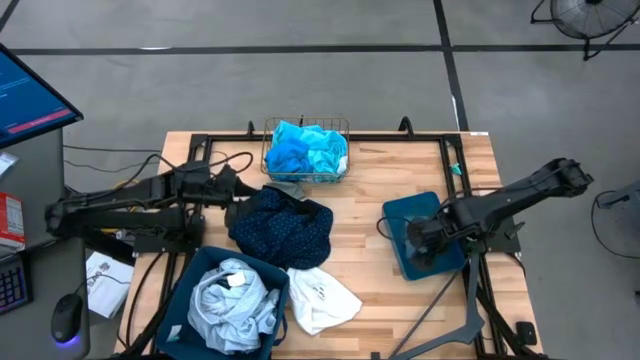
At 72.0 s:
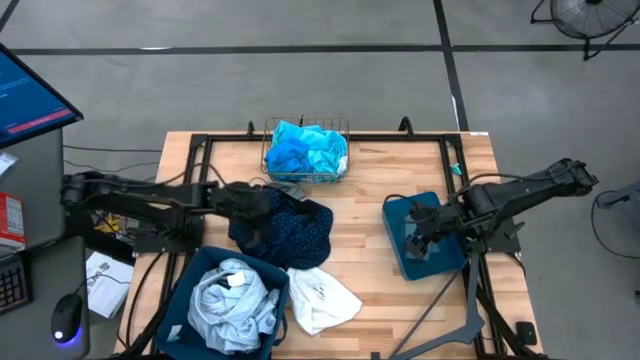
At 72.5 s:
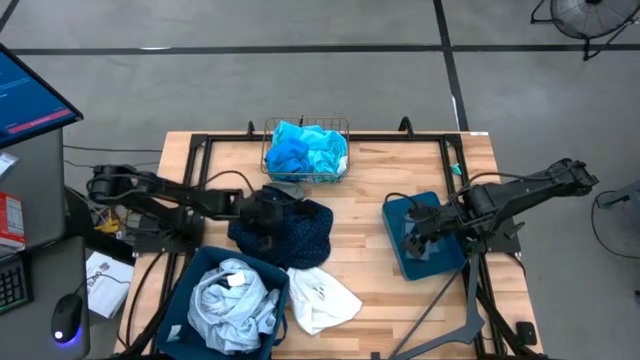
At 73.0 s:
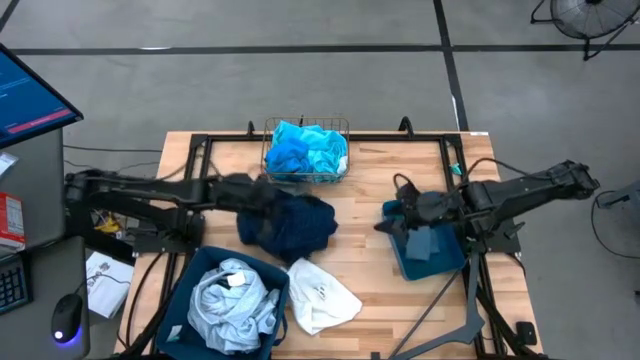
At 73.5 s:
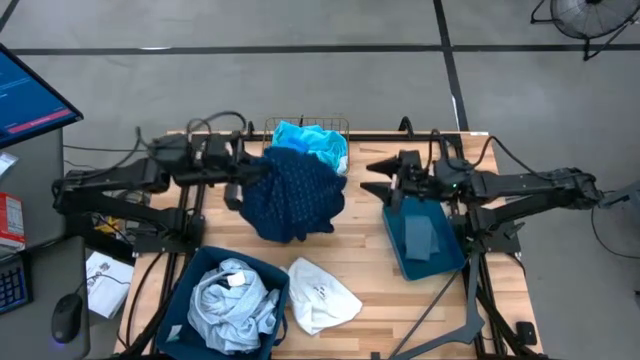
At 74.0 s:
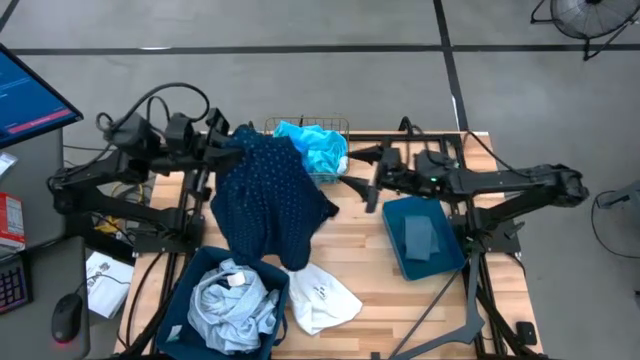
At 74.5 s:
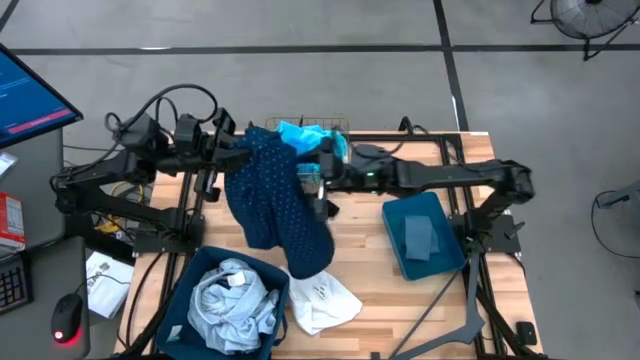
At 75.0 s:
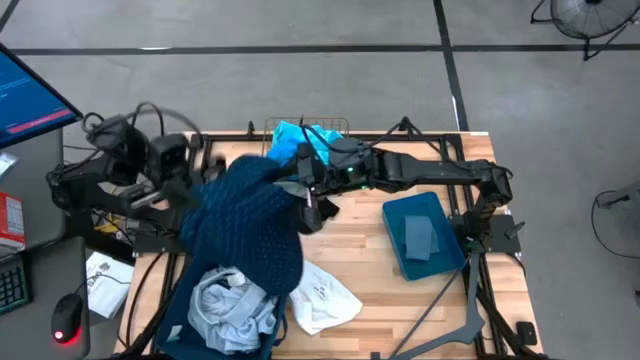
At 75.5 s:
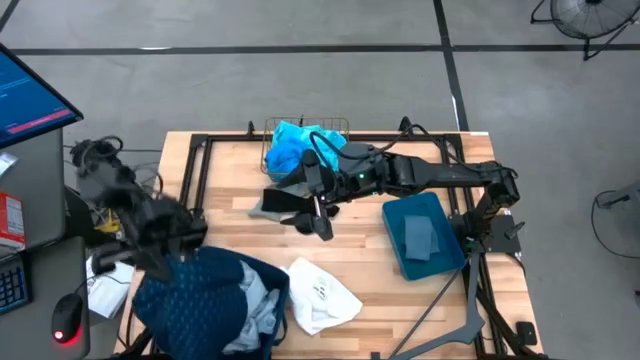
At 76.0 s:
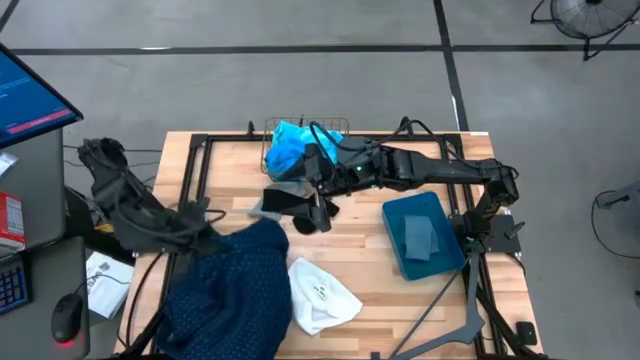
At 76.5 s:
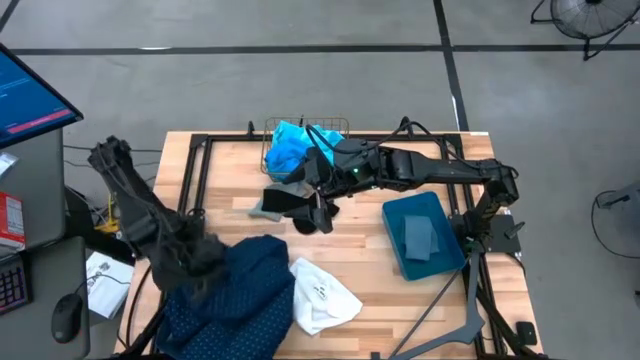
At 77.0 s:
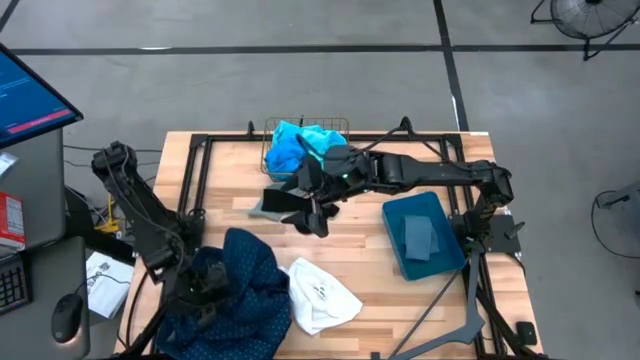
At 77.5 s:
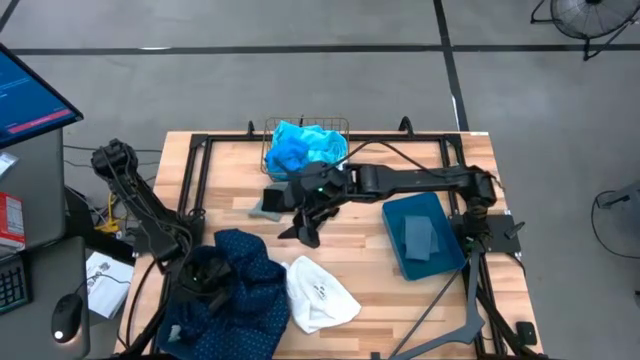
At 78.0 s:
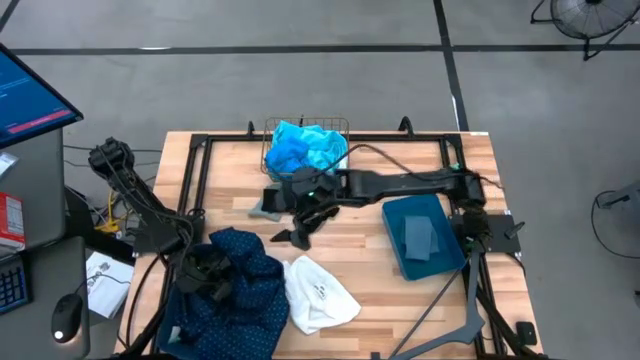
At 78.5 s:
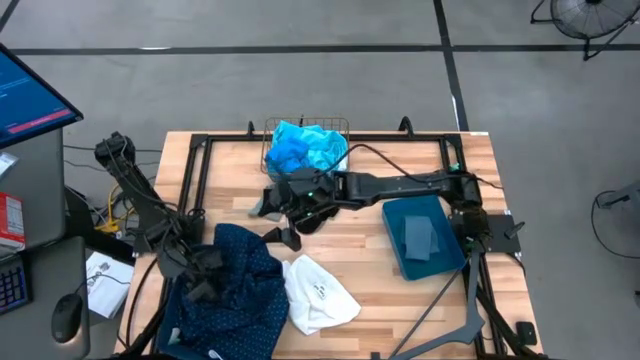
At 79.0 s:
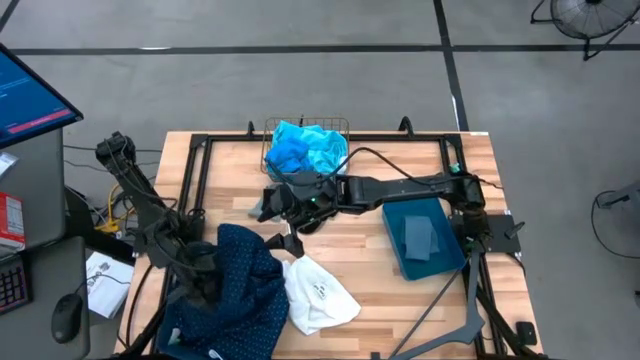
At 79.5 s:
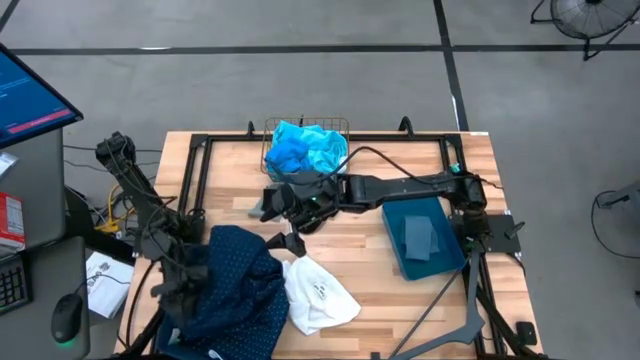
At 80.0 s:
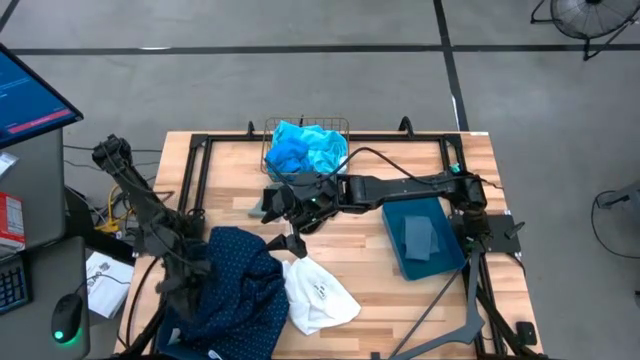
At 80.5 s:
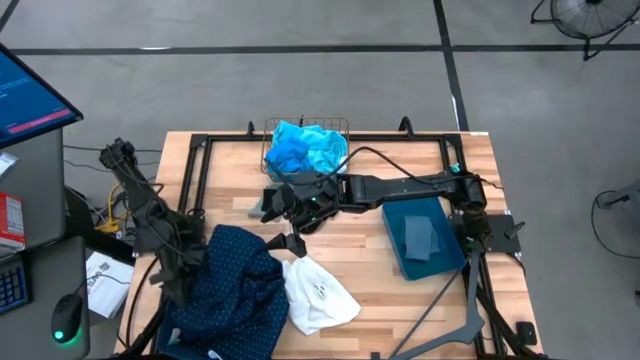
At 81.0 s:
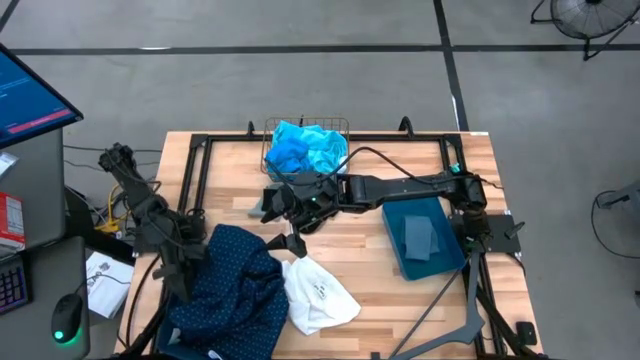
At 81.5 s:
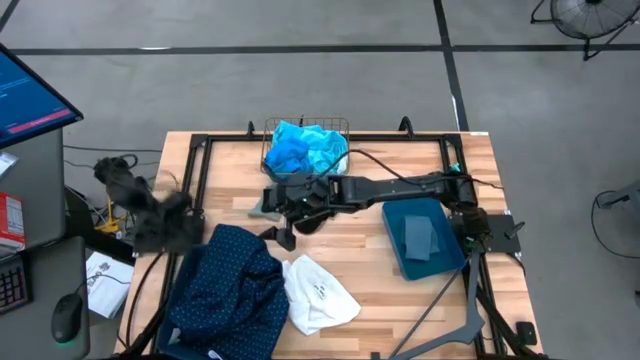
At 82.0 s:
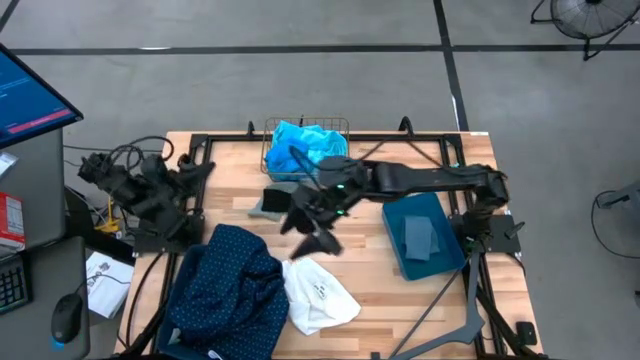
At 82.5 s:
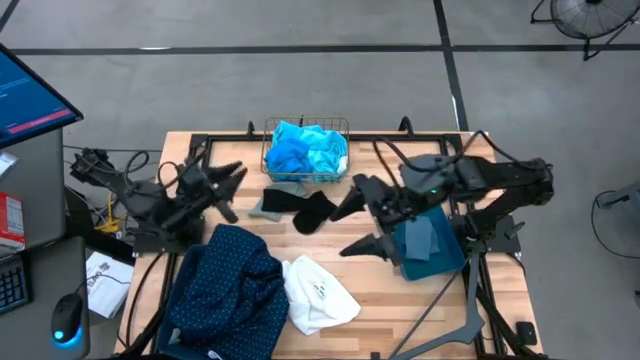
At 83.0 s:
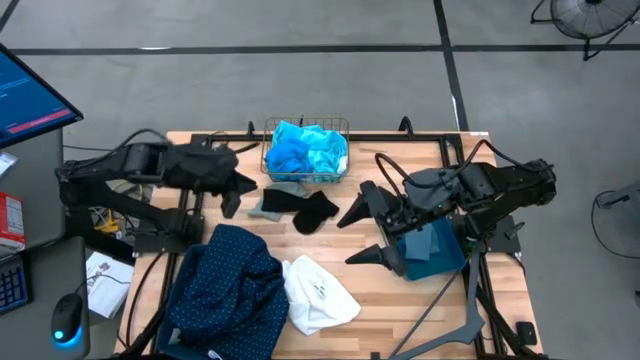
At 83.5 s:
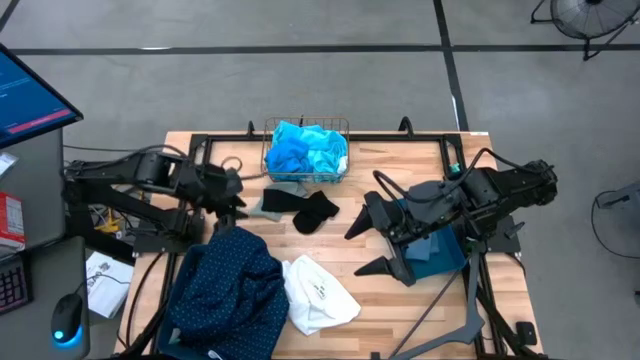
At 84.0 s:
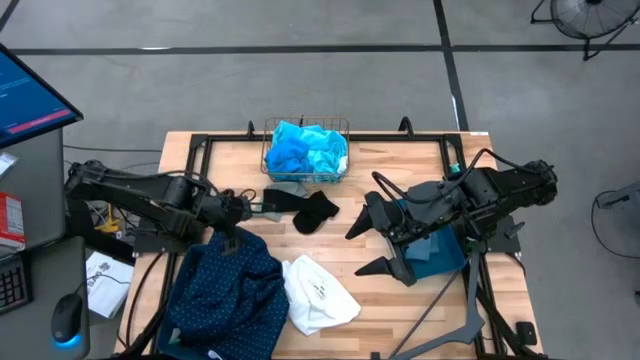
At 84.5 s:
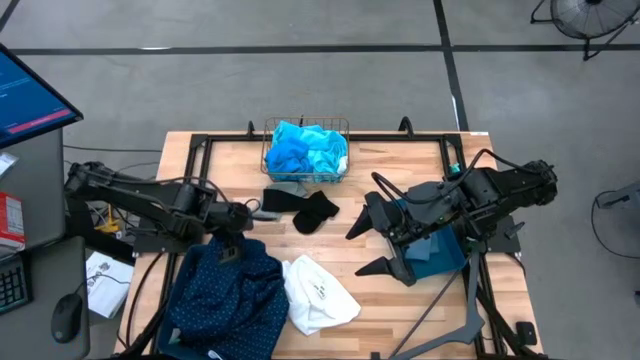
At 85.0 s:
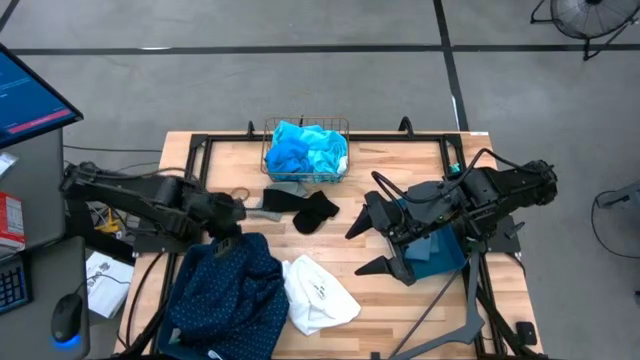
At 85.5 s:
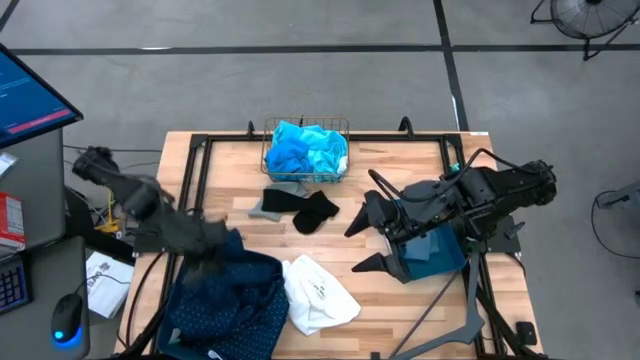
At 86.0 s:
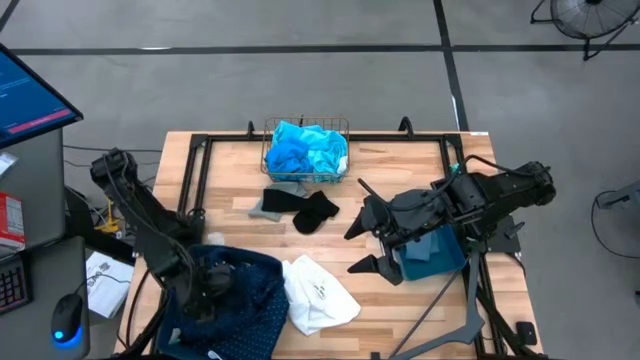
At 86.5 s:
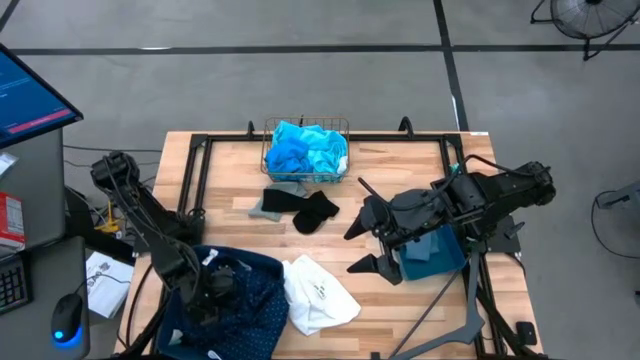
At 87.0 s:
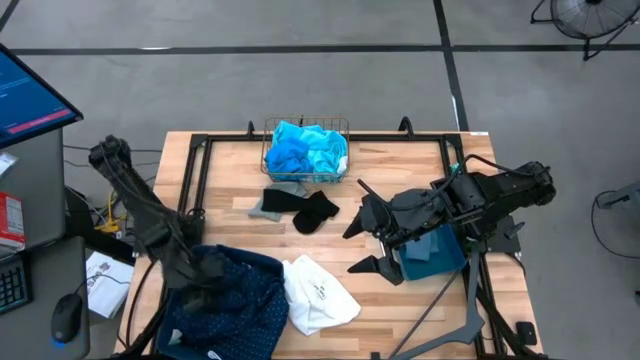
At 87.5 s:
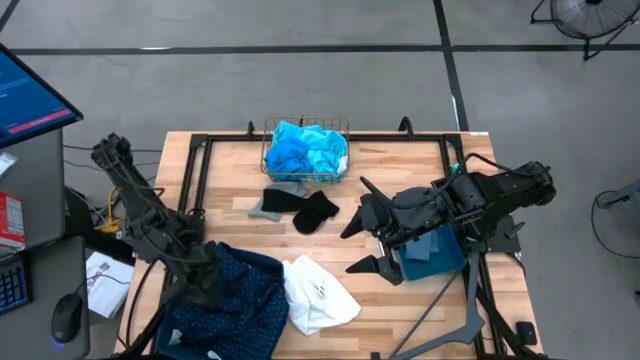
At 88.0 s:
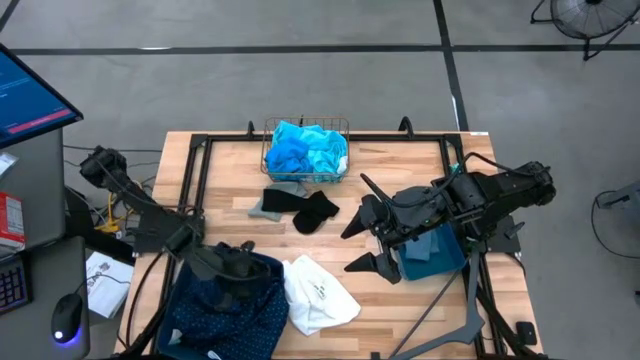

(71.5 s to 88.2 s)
Task: Pick & Place Cloths
Put the blue patterned shirt into the blue laundry organizer

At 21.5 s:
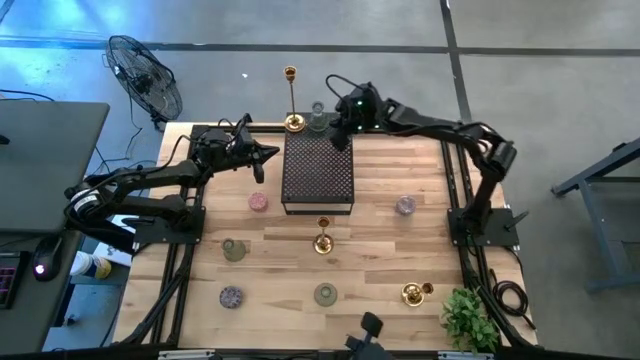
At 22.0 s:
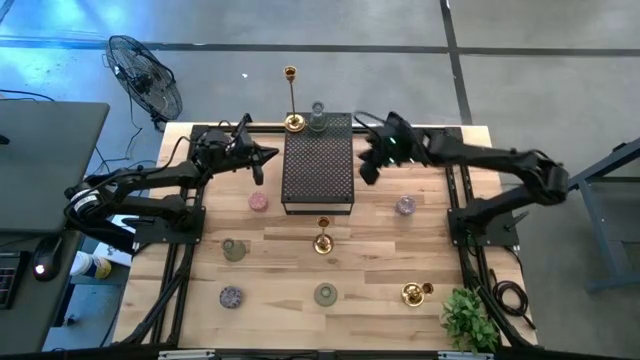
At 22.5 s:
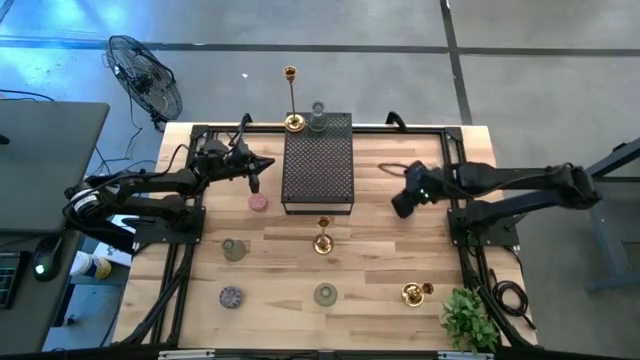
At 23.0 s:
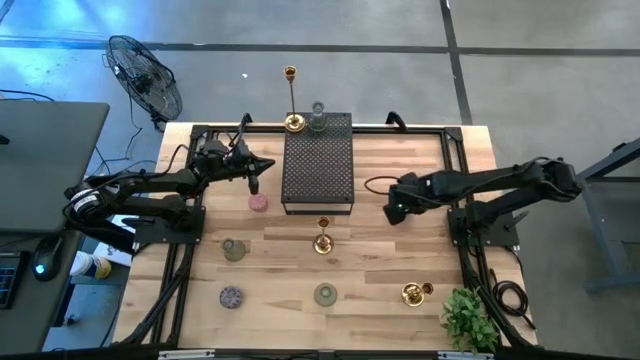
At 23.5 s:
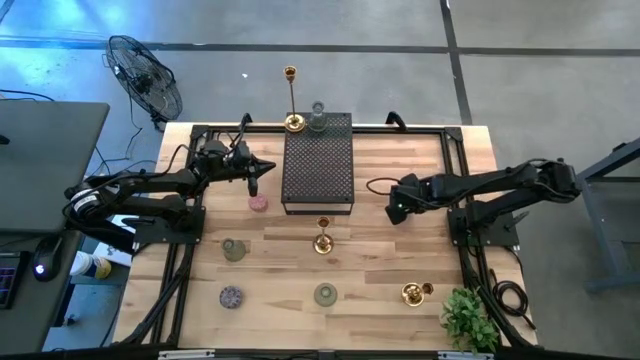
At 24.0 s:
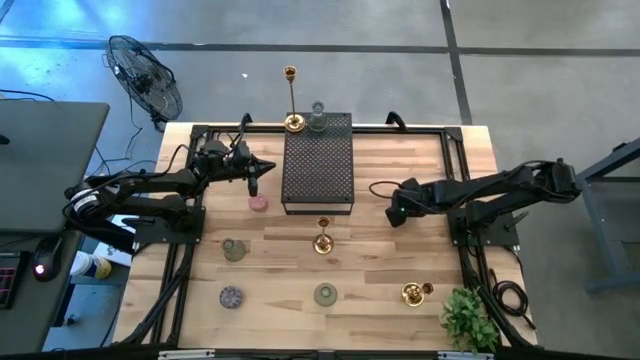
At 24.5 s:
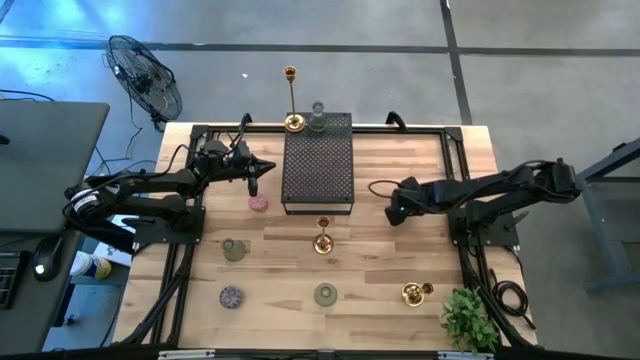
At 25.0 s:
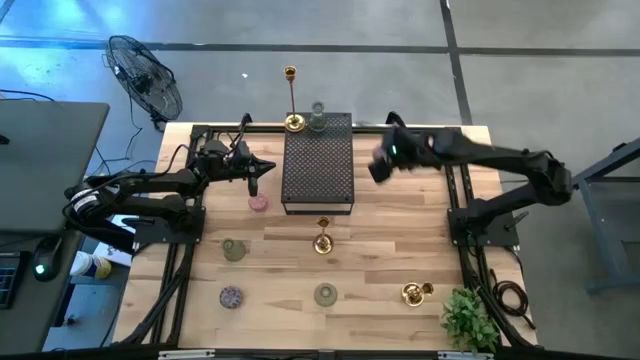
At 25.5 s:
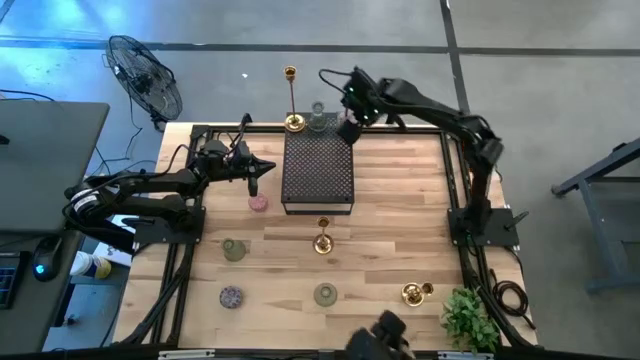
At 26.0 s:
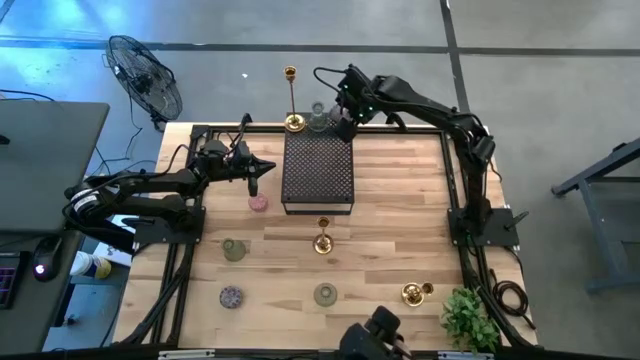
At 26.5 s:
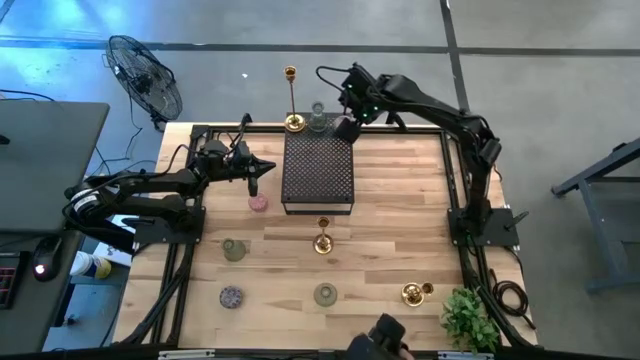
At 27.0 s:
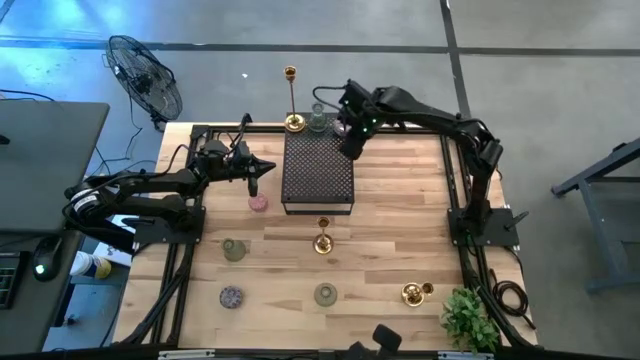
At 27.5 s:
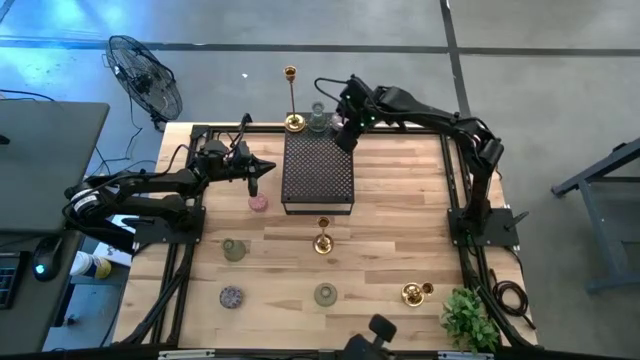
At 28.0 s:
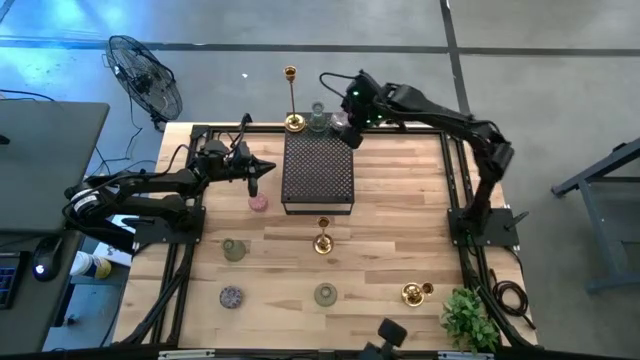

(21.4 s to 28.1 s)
Task: Pick & Place candle stick holders
Put the red patterned scented candle on the shelf
